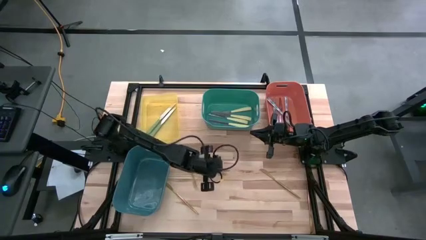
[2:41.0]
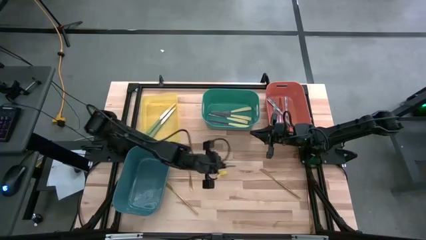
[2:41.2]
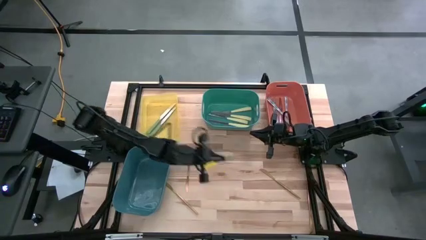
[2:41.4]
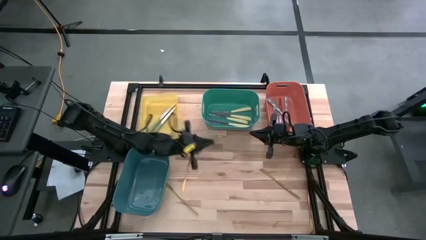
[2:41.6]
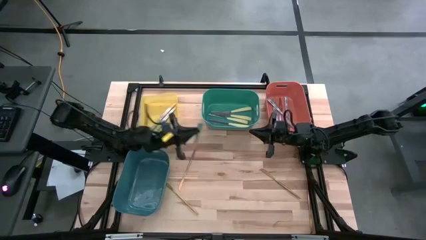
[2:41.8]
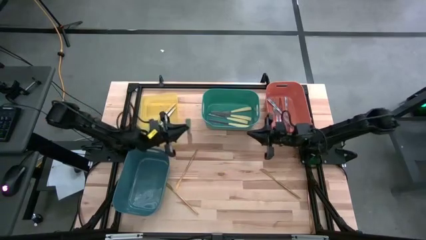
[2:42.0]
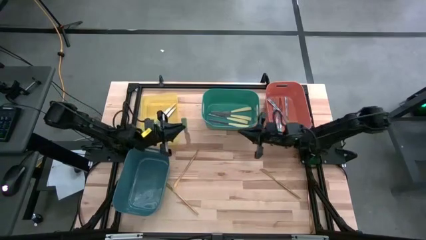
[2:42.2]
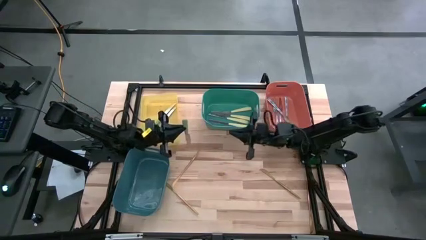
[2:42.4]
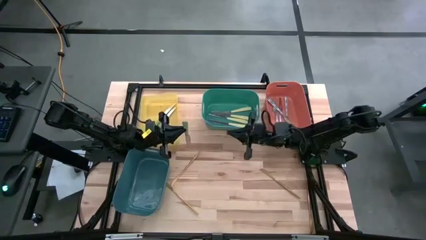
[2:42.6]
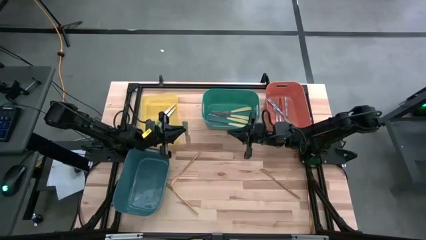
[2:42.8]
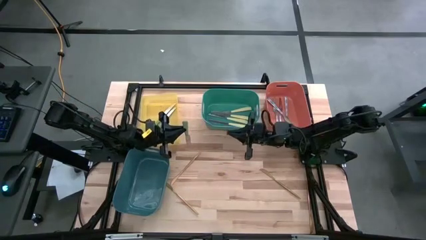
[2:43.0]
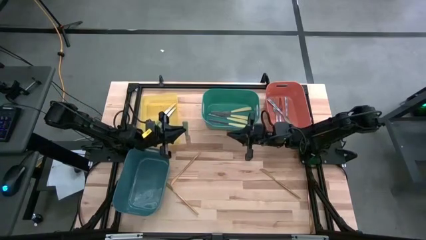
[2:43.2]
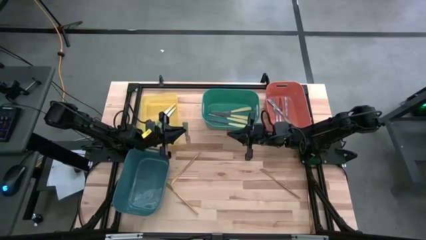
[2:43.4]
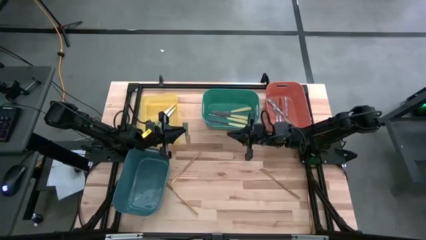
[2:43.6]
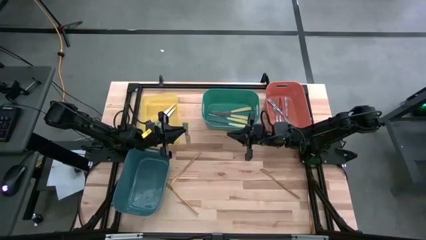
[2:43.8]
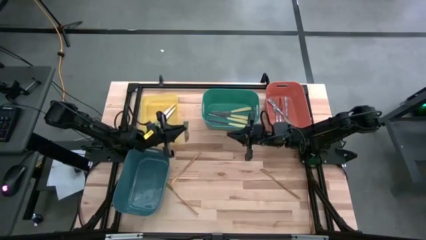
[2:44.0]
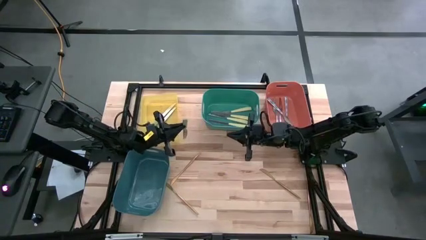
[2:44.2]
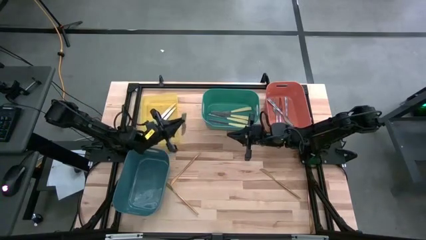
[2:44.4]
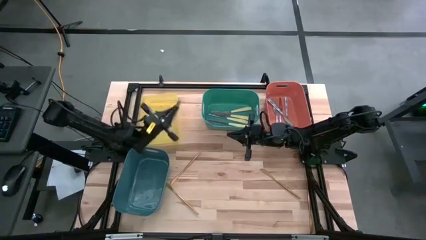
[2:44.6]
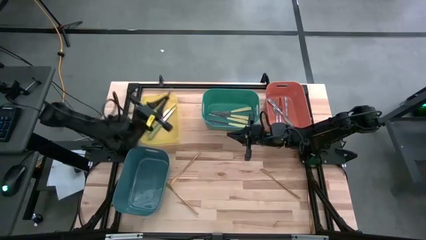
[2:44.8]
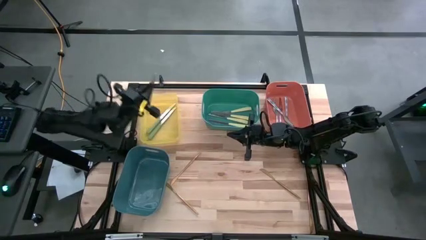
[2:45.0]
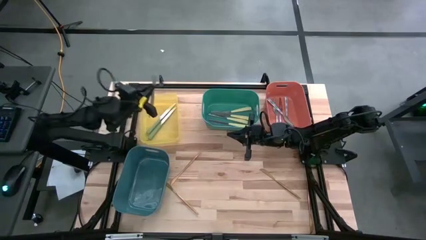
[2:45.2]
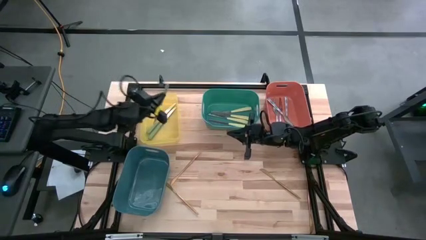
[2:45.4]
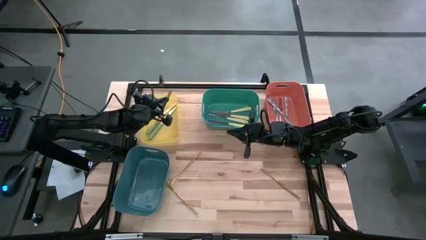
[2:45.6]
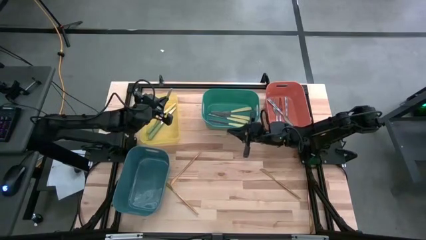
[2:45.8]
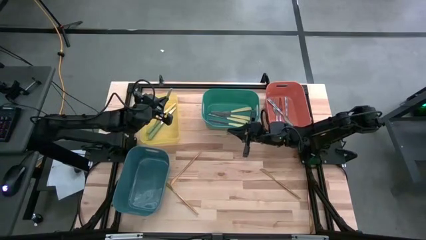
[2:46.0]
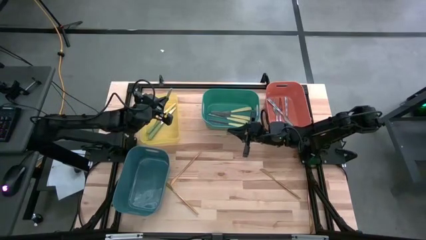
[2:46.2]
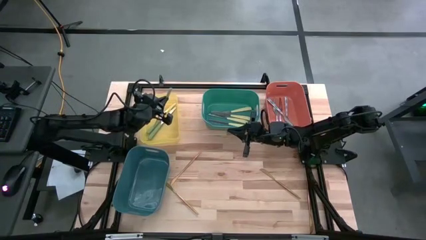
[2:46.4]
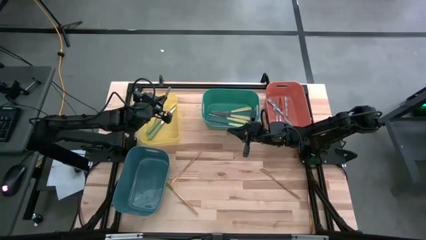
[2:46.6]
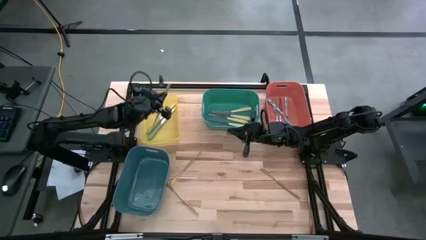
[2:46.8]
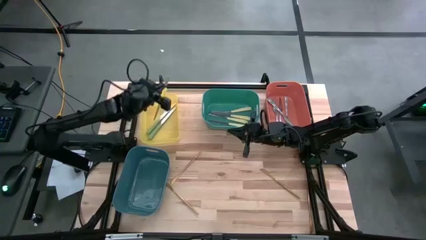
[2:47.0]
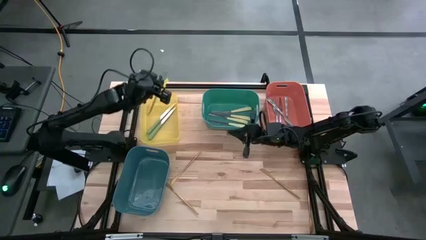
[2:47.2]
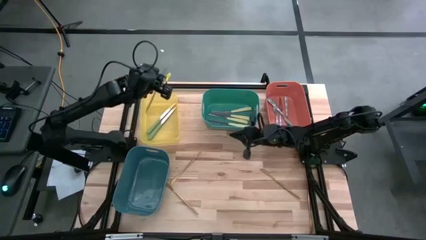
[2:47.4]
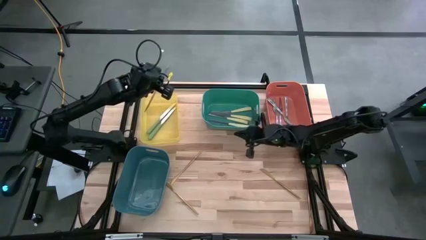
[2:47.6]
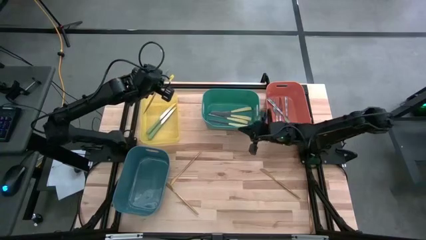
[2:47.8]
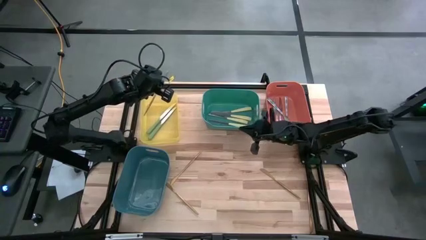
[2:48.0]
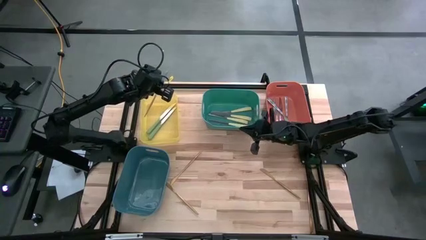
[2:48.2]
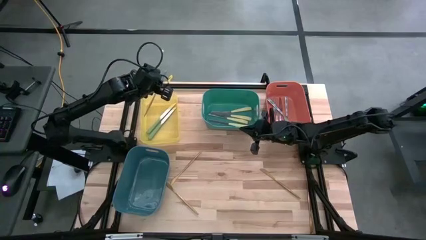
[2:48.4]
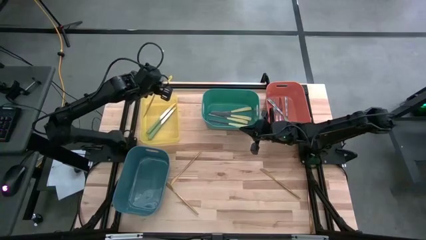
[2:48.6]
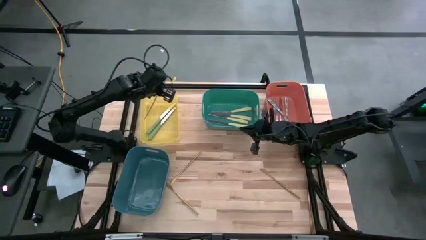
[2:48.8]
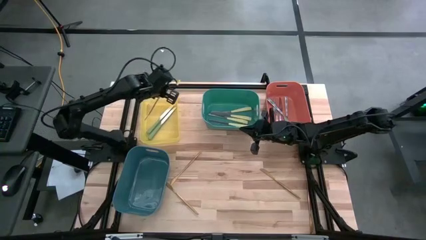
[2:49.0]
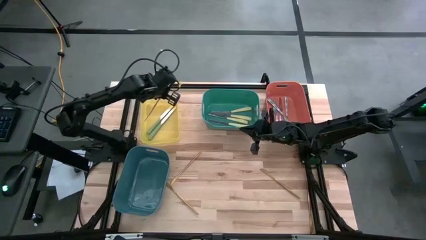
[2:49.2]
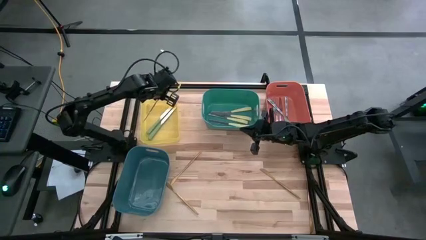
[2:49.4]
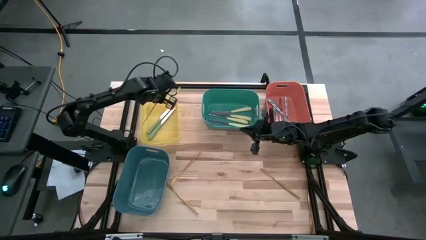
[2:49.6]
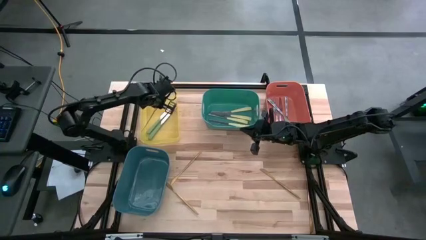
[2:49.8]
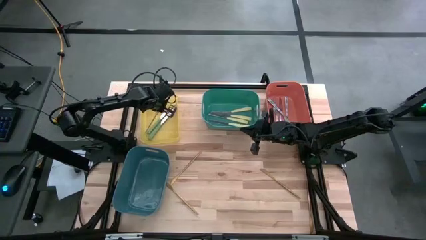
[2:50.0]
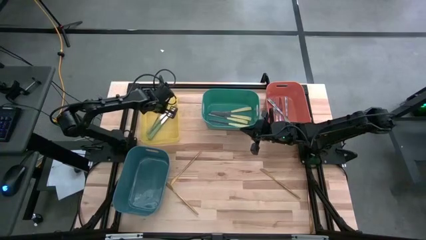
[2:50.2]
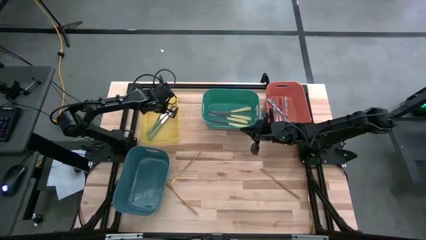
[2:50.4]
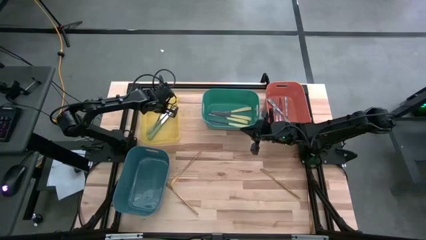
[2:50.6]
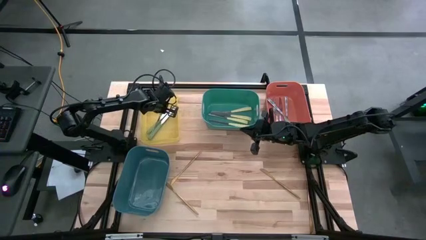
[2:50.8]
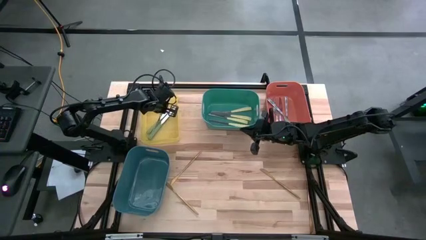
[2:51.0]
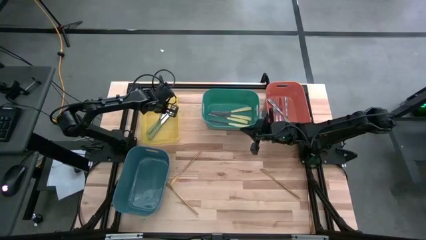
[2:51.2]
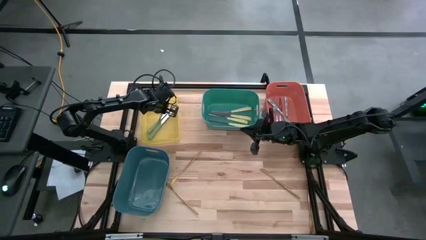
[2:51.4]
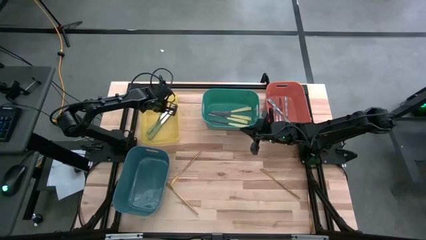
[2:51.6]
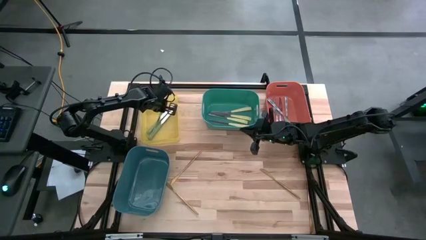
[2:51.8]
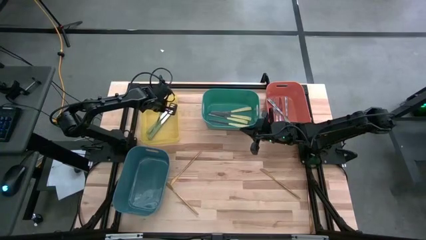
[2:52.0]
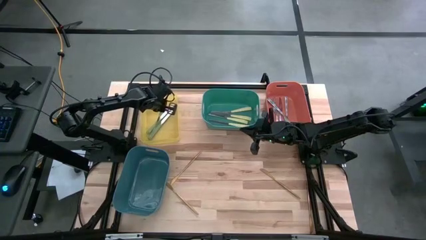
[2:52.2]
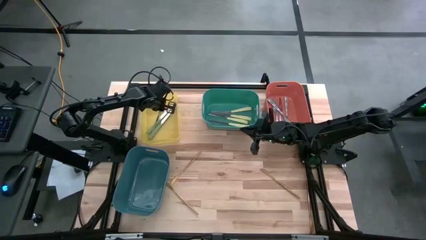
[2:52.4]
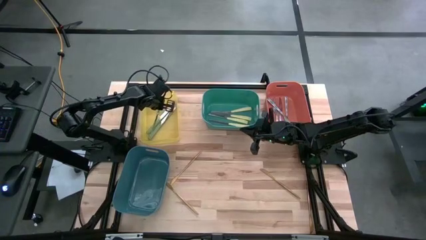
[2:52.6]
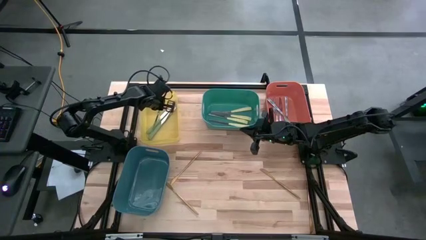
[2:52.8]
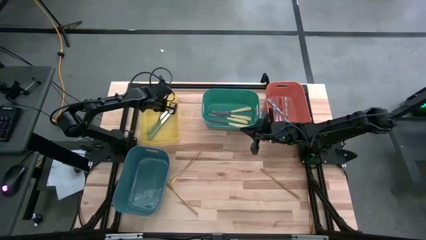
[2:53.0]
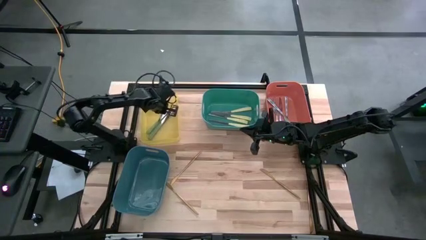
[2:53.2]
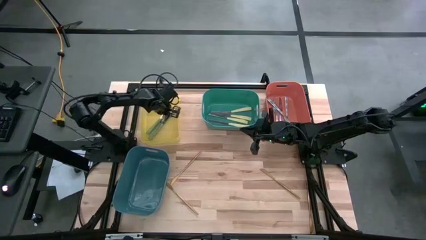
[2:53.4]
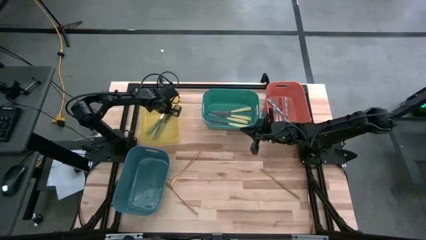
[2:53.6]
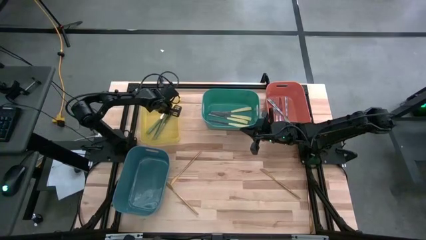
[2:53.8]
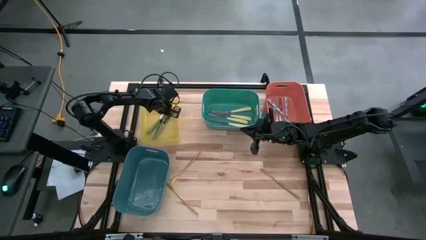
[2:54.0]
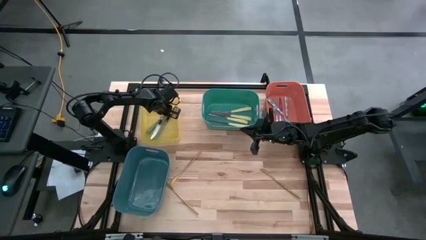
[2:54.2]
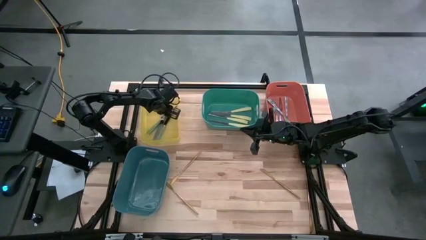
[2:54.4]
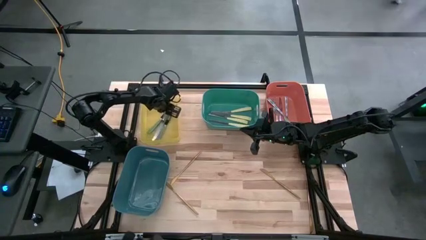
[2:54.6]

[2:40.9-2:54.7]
Task: Sort silverware by color (type)
Put the green knife into the yellow bin
